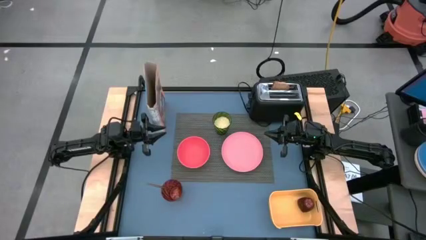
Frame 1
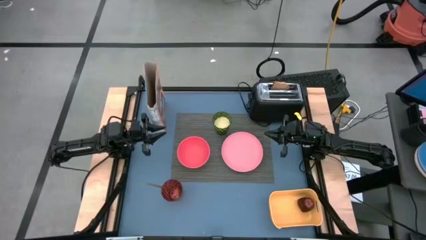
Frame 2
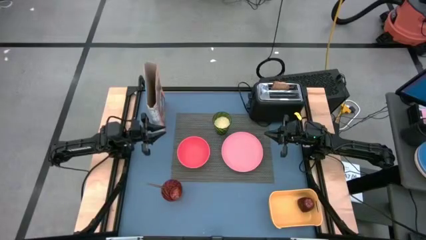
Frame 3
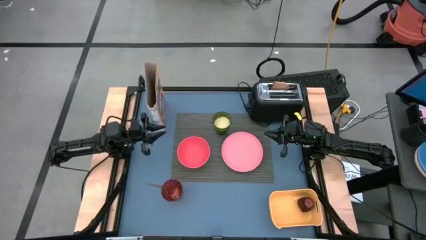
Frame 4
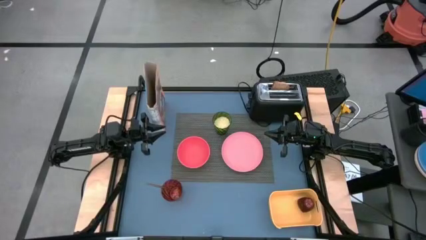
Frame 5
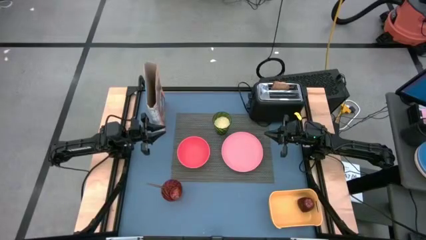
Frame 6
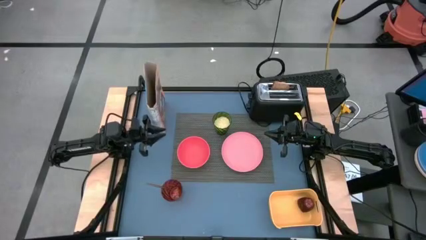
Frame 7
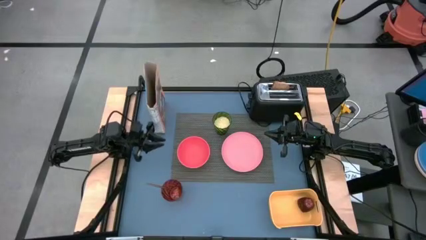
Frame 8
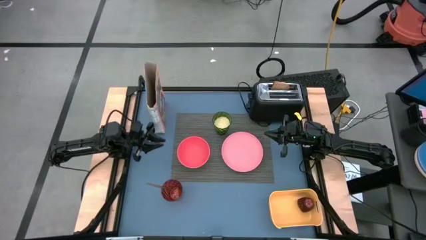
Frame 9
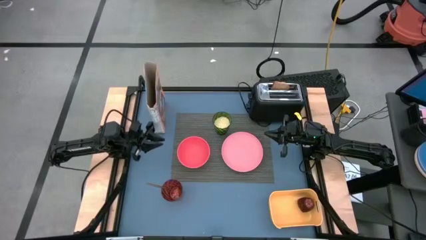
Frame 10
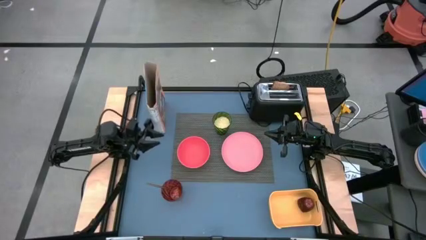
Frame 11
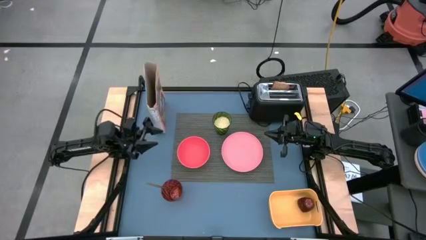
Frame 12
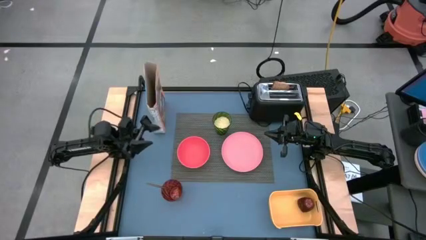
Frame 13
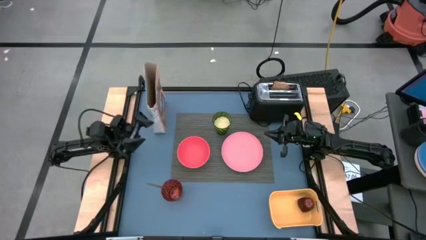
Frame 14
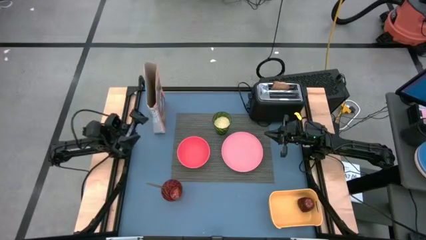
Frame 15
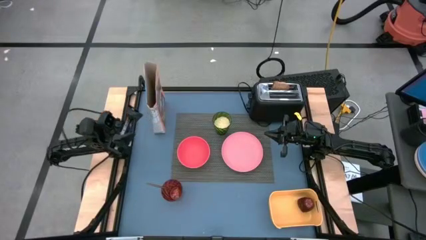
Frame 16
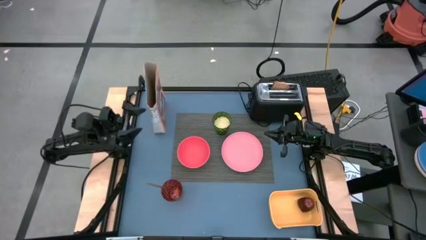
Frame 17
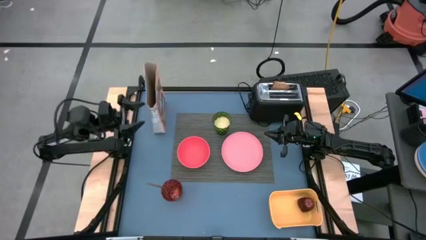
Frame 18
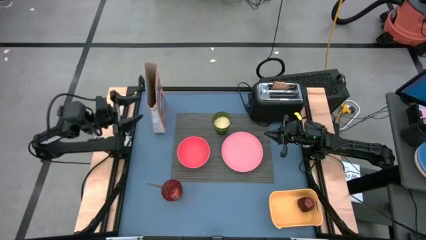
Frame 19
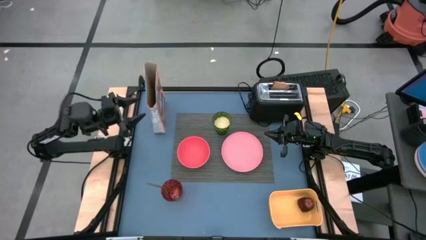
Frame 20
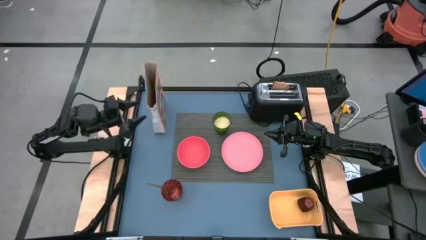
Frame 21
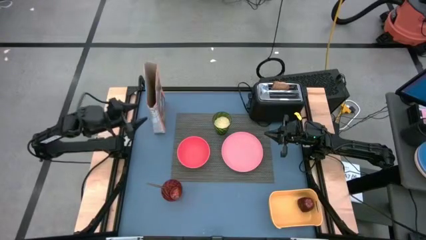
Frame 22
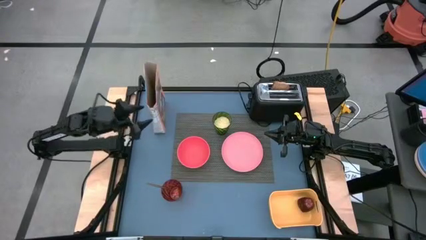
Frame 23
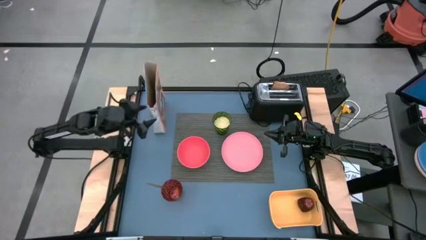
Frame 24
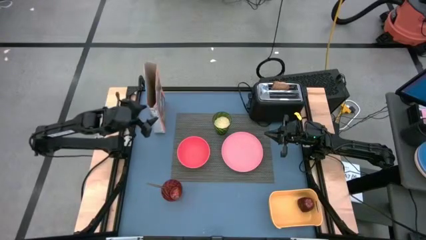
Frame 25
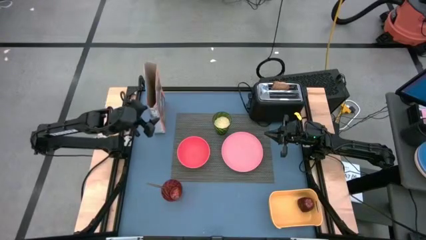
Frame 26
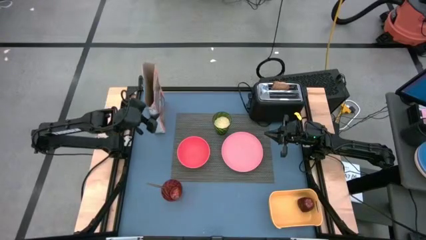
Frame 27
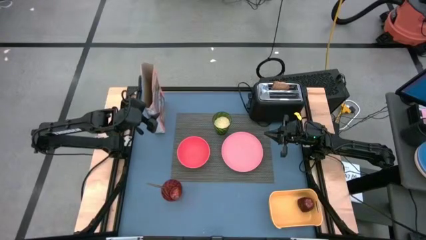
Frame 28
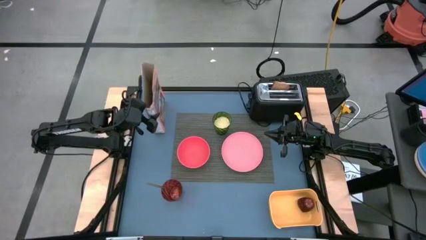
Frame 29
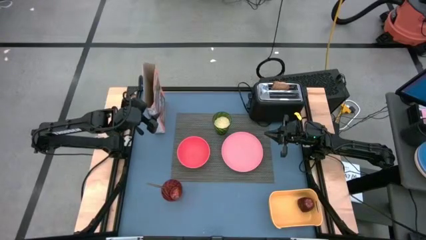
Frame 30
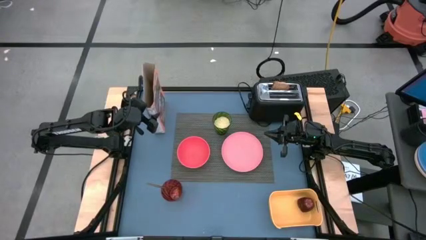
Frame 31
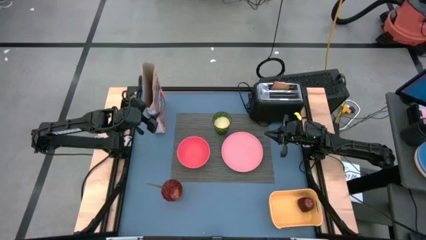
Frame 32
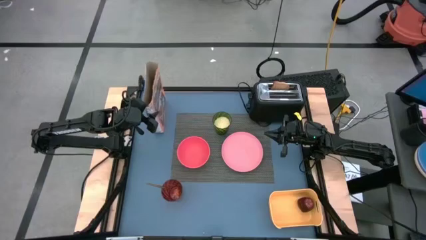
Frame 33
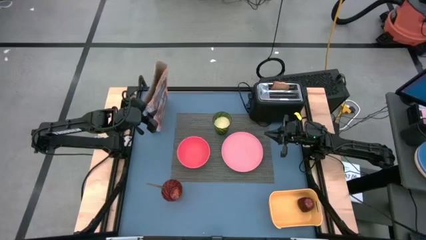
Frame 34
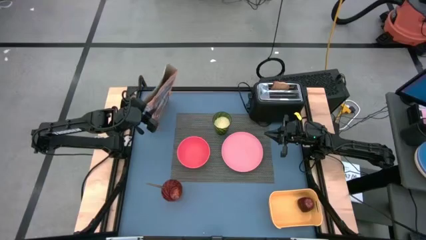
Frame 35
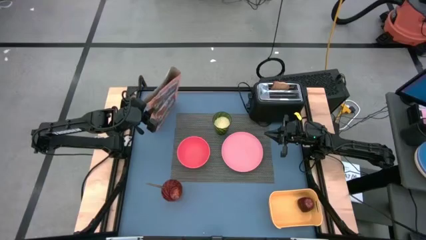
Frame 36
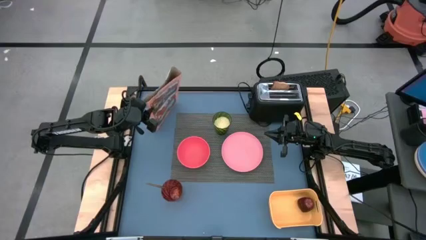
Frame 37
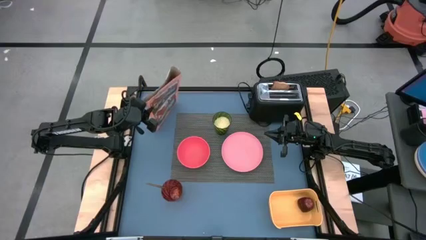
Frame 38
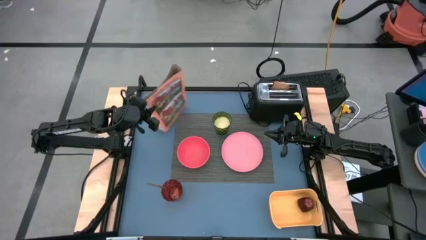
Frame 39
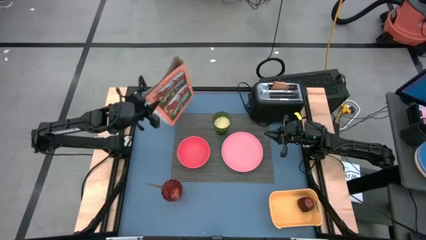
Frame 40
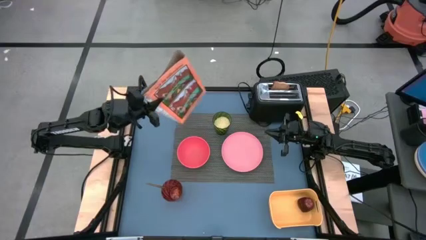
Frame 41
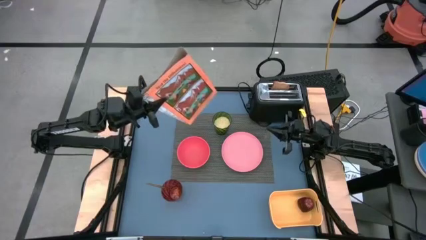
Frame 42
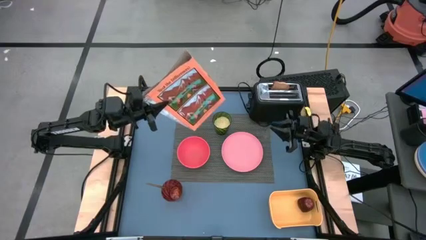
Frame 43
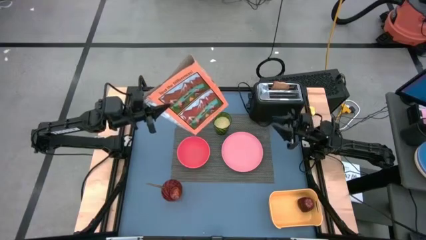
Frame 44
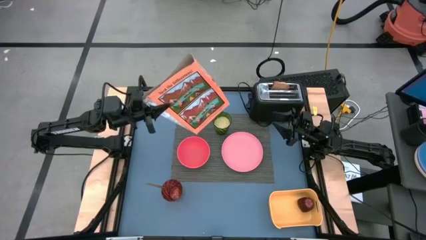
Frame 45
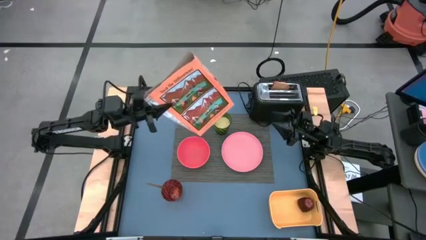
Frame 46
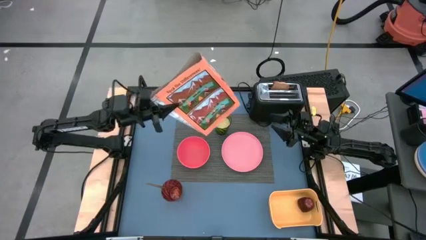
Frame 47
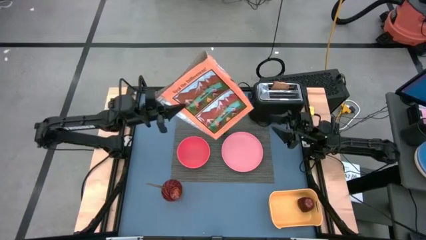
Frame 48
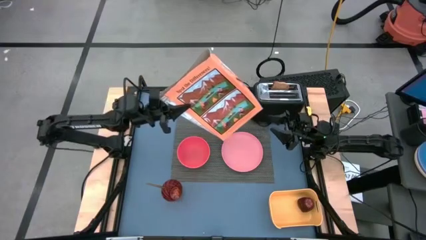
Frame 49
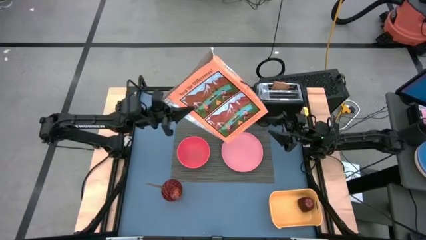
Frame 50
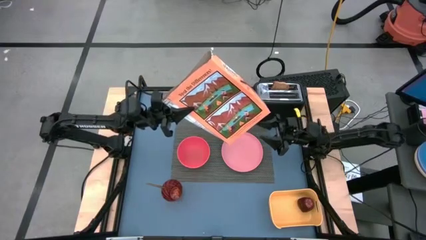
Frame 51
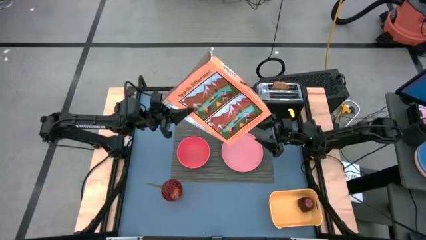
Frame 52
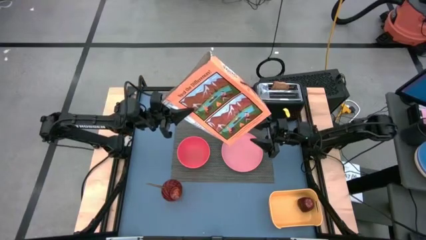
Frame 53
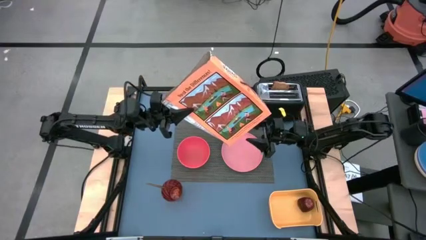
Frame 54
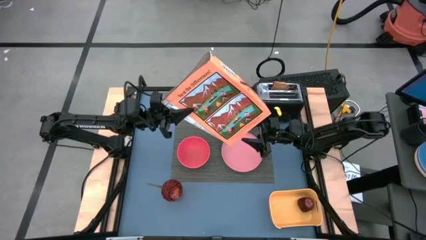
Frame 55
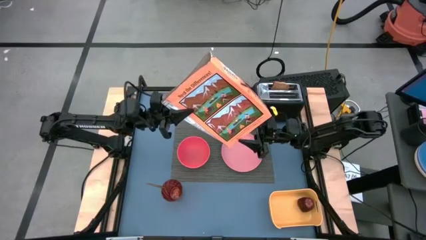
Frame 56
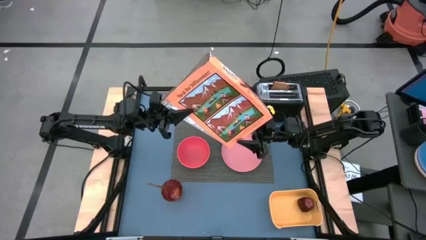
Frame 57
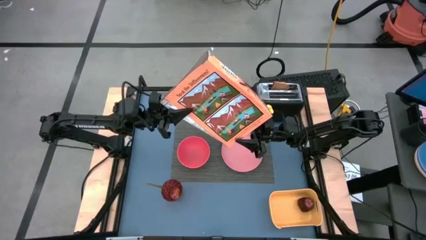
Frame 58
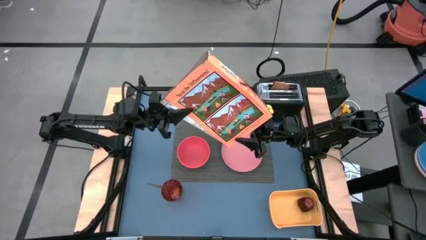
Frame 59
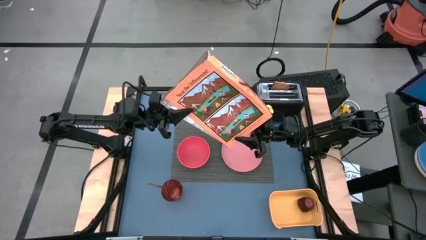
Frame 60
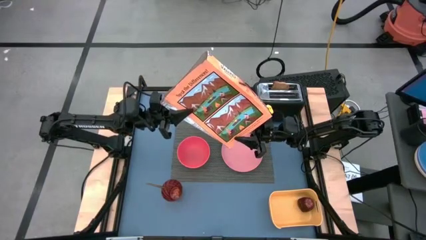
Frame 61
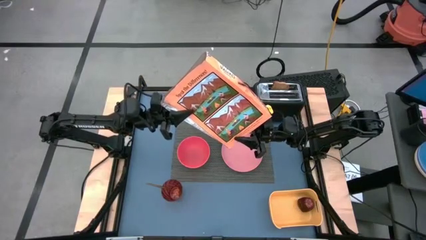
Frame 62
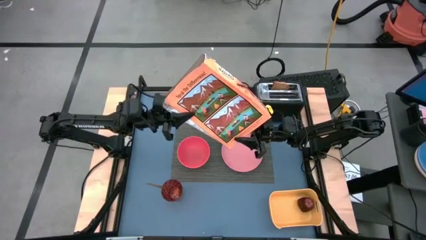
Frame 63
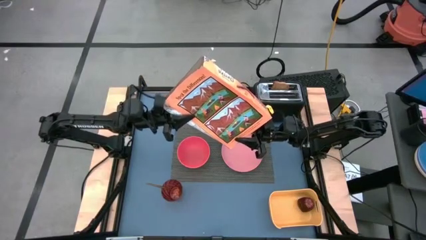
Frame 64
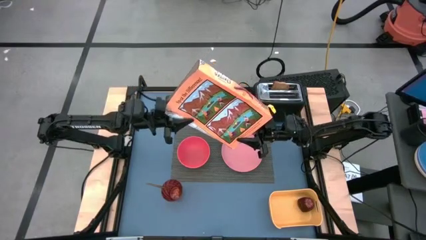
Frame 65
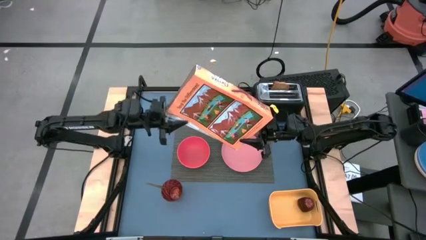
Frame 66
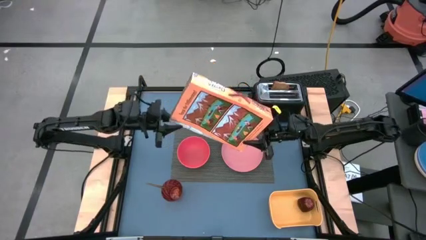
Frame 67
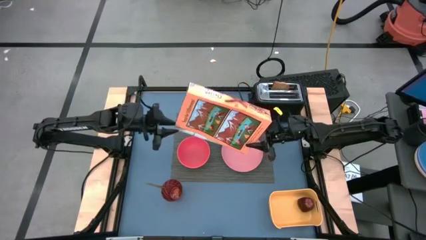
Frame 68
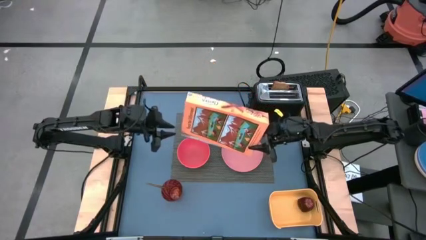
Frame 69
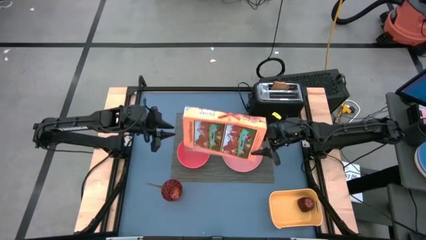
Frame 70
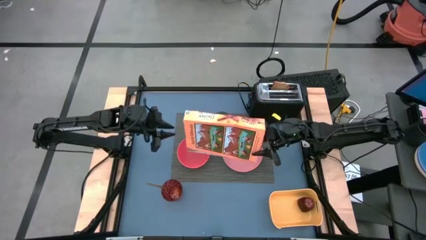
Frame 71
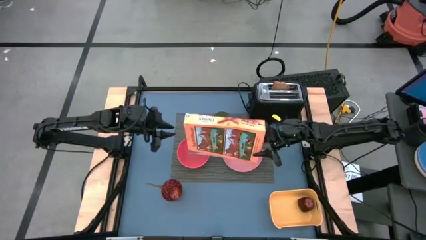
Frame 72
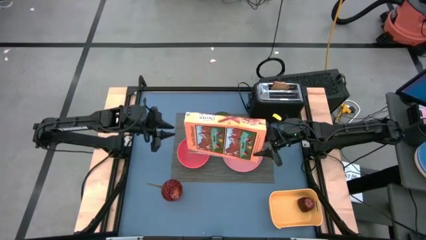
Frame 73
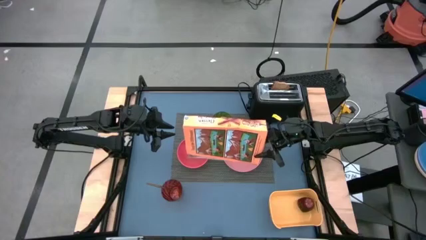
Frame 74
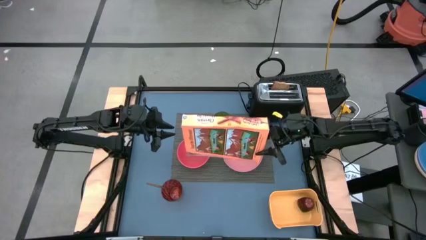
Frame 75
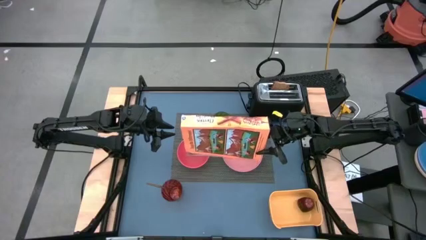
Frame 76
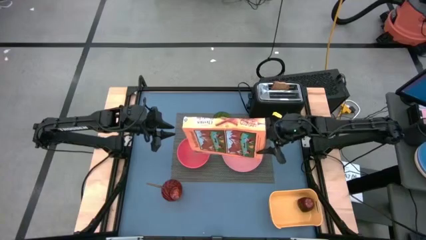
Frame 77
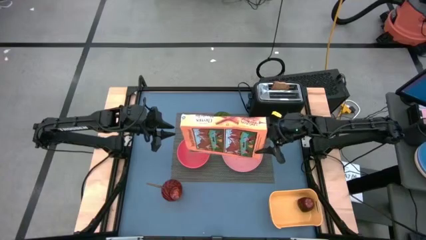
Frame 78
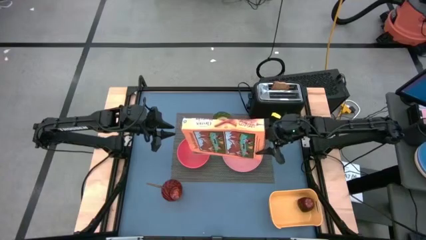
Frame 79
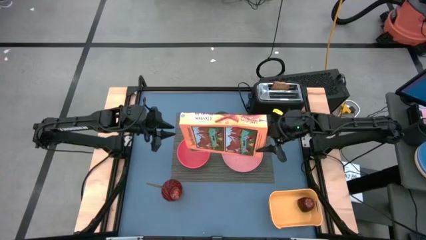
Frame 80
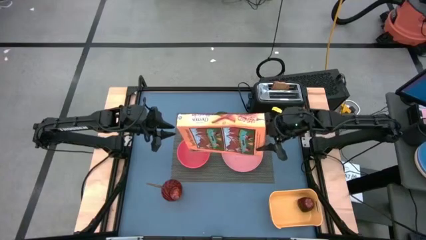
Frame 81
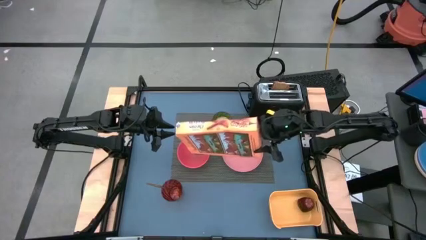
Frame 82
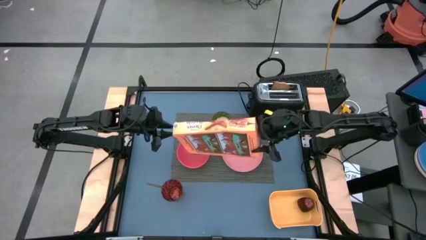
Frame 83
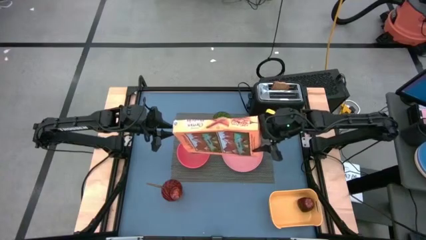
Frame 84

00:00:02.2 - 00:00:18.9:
Task: Arrange a breakfast setting
Pour the cereal into the red bowl
